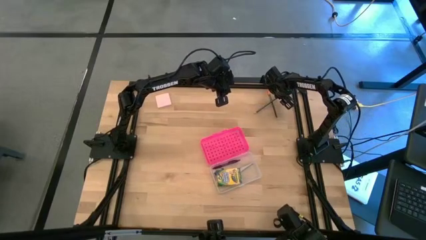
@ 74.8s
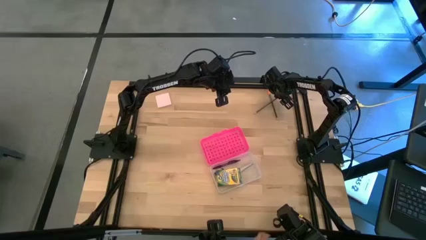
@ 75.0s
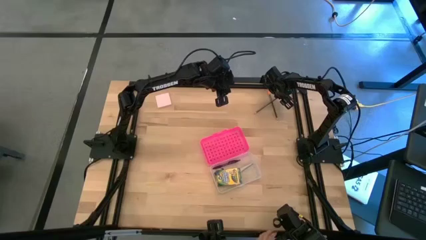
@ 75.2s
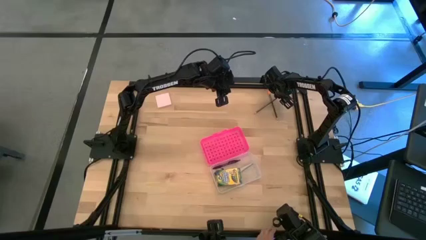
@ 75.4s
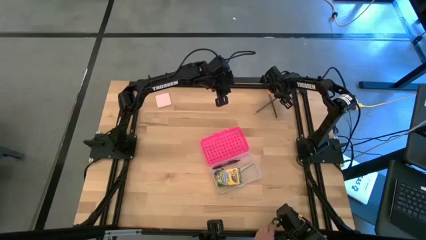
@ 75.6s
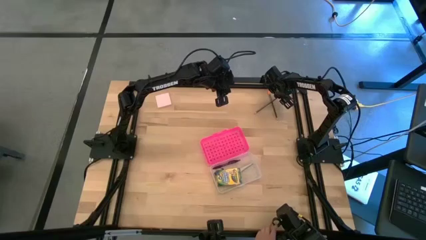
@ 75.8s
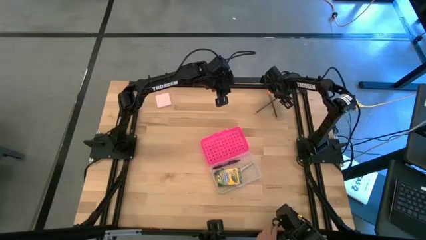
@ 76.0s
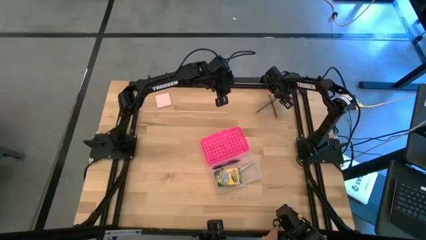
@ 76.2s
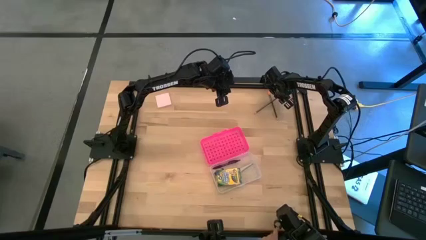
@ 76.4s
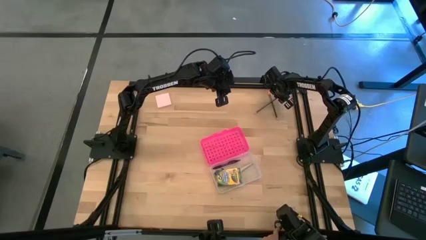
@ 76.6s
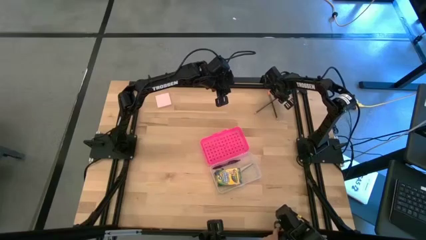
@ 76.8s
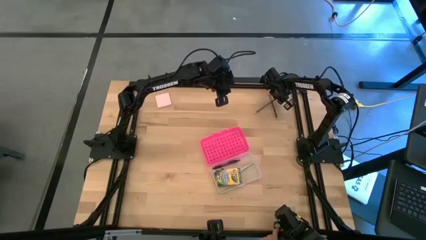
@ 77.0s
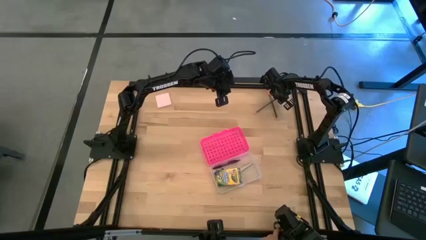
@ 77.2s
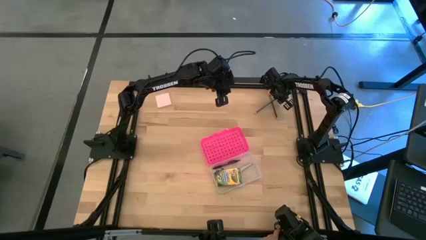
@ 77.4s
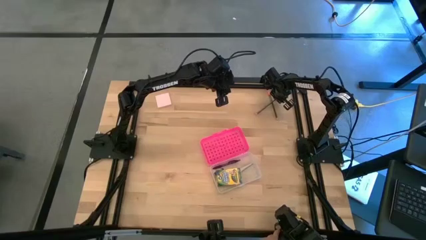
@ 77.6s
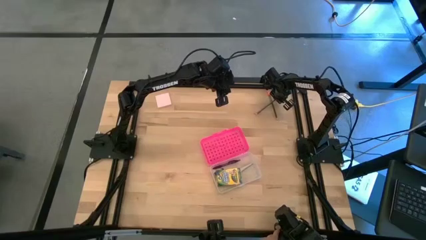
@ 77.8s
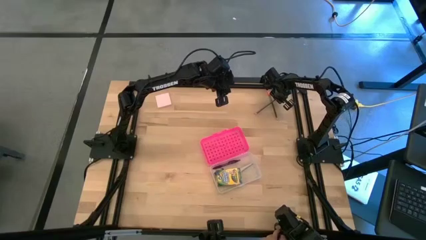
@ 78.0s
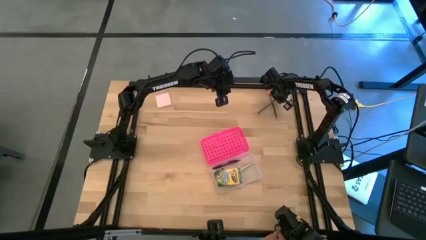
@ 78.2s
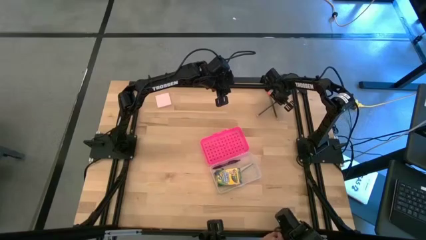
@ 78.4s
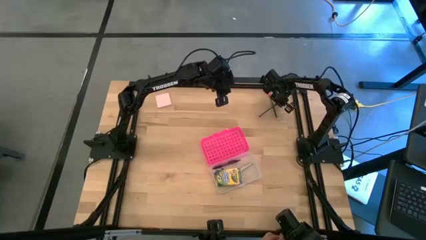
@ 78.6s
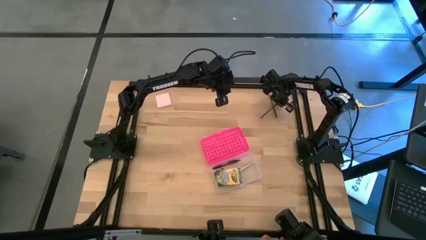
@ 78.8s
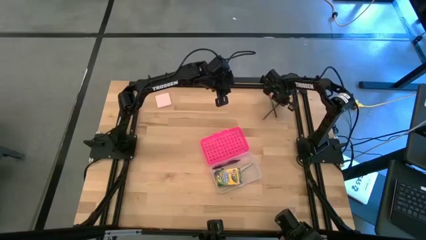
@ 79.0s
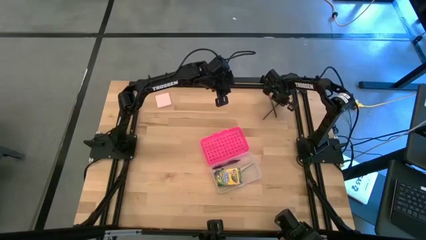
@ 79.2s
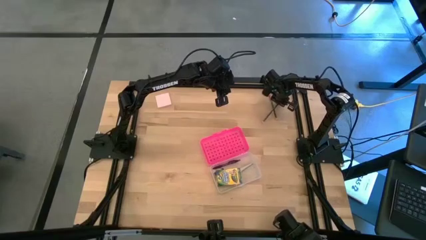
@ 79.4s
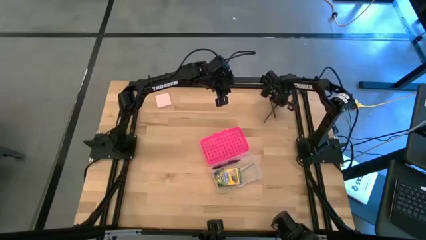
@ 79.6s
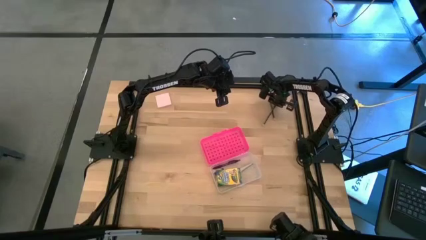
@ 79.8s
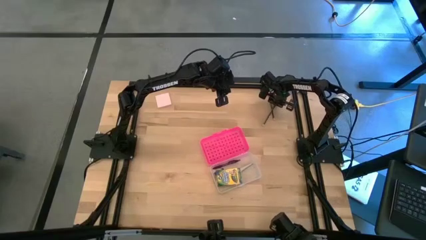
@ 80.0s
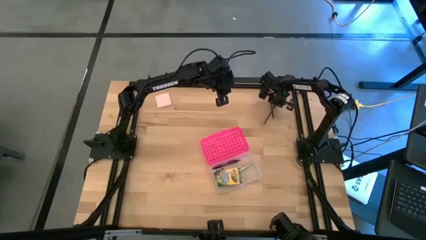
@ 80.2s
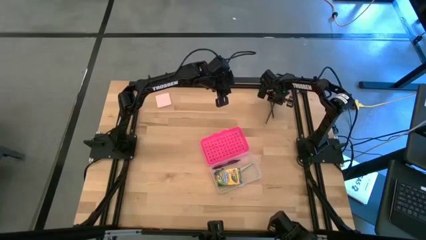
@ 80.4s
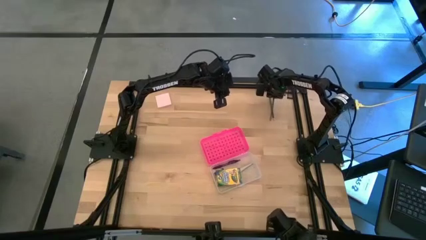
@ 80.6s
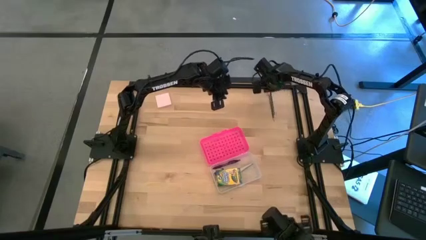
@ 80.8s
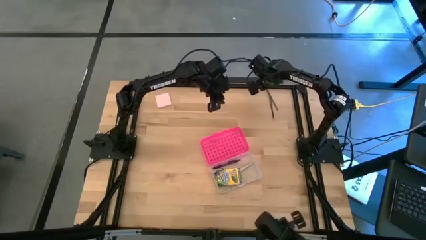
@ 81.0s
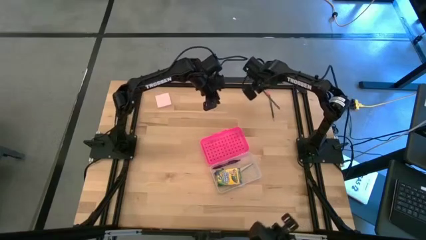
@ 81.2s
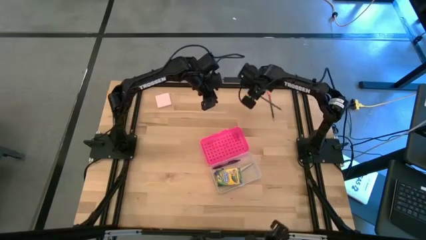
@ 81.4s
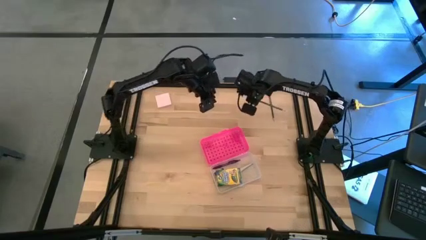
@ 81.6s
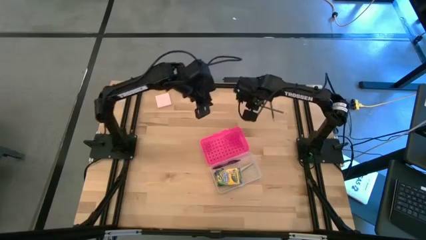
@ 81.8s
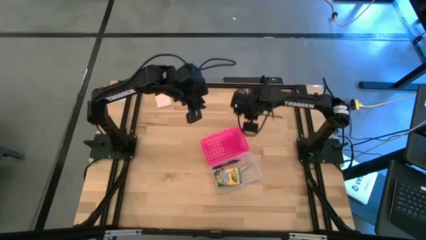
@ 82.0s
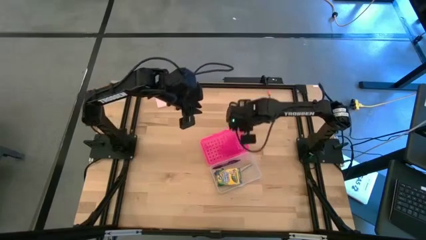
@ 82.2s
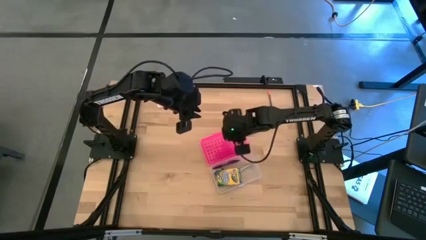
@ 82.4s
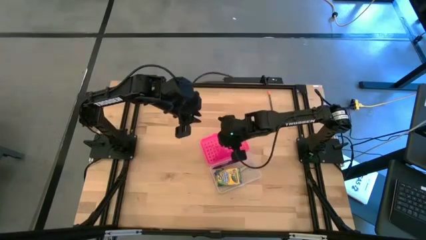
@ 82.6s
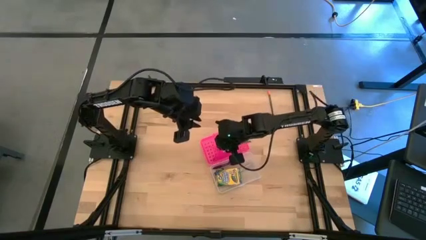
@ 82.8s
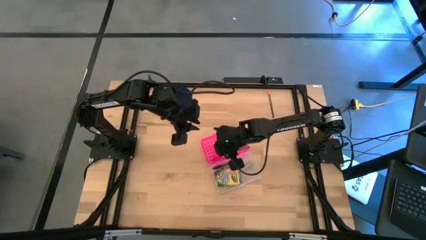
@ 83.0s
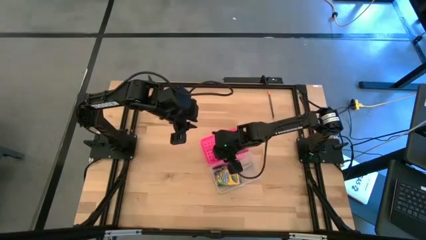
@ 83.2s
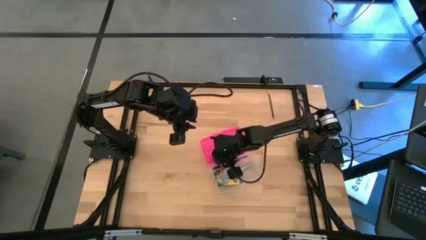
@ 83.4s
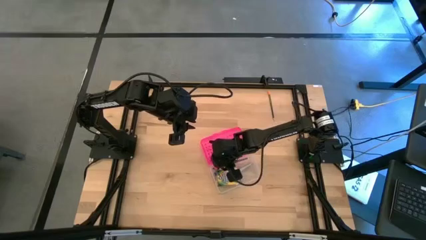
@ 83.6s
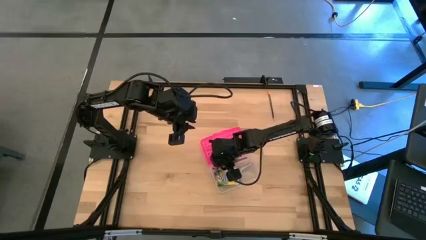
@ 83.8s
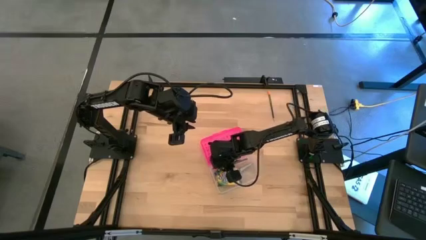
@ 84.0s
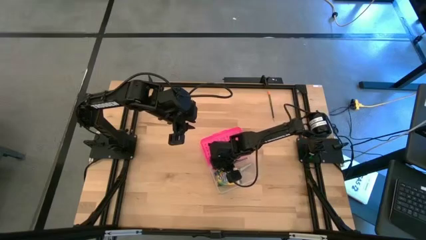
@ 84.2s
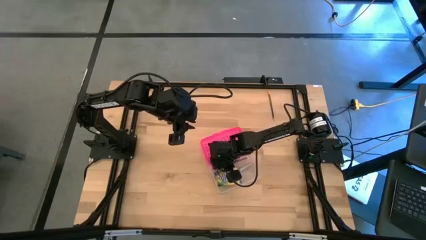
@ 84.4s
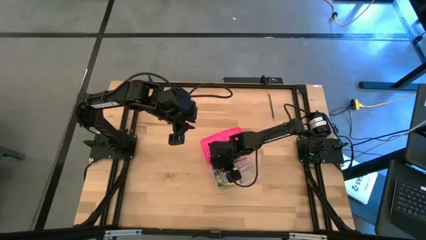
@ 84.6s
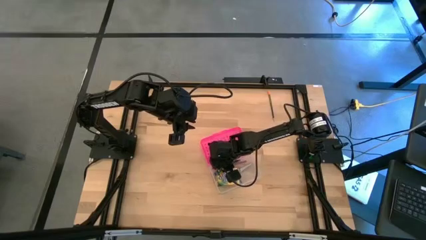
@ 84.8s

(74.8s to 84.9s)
Task: Pack school essentials
Put the pencil with the pink top eraser into the pink box

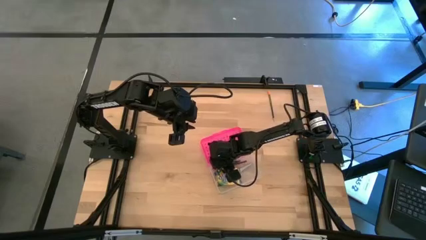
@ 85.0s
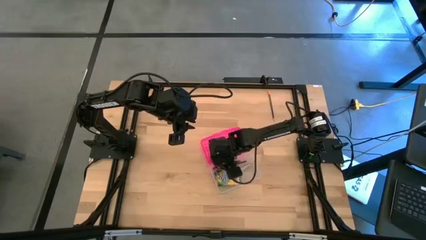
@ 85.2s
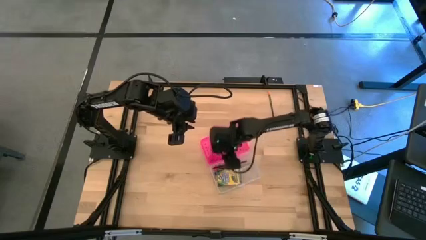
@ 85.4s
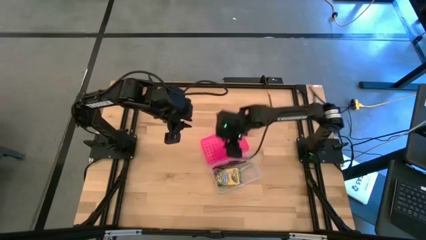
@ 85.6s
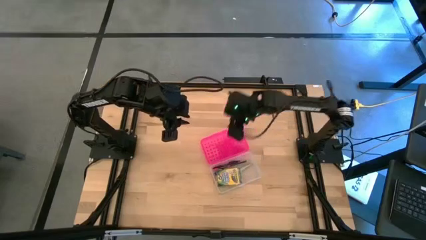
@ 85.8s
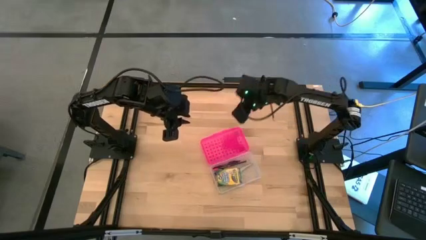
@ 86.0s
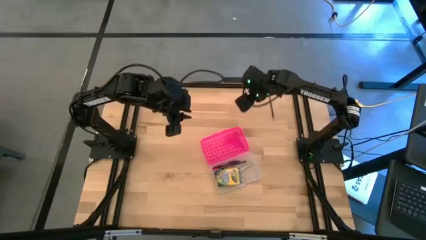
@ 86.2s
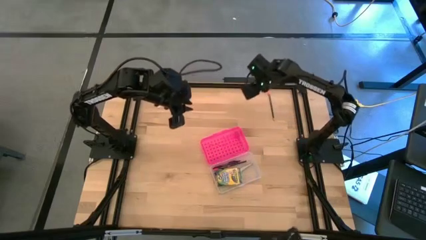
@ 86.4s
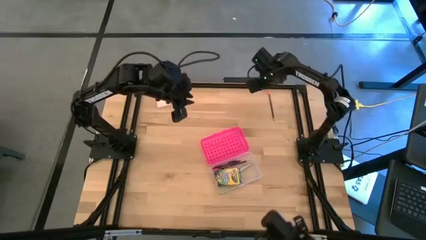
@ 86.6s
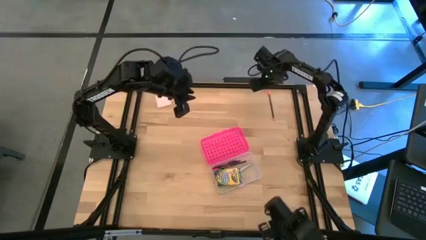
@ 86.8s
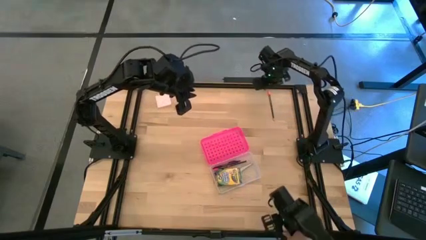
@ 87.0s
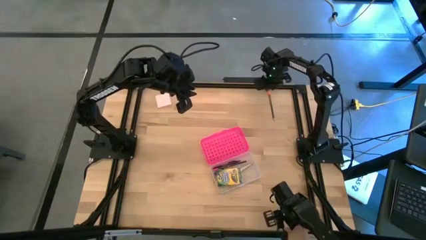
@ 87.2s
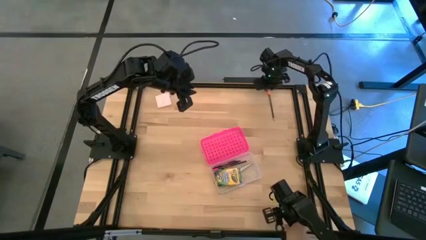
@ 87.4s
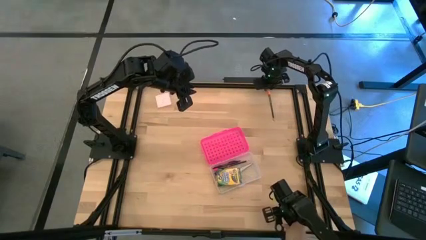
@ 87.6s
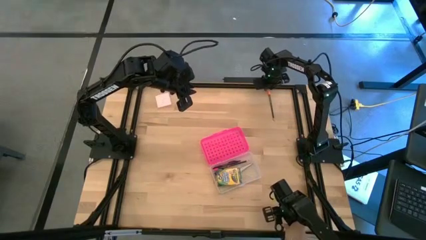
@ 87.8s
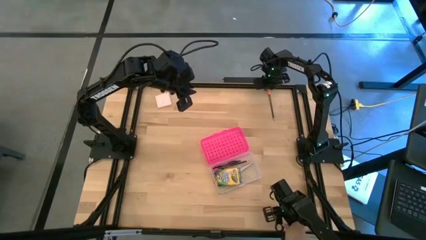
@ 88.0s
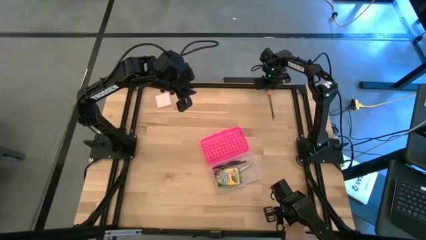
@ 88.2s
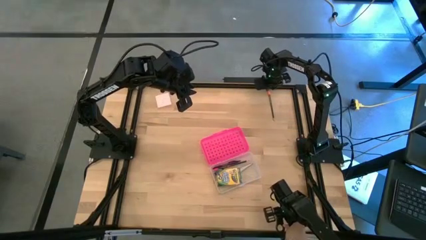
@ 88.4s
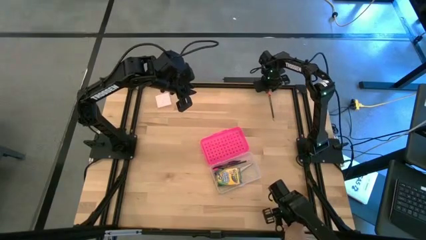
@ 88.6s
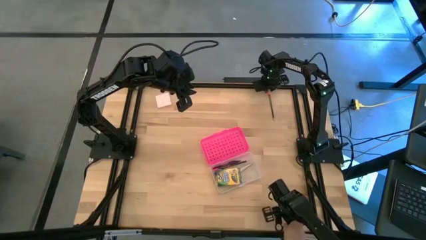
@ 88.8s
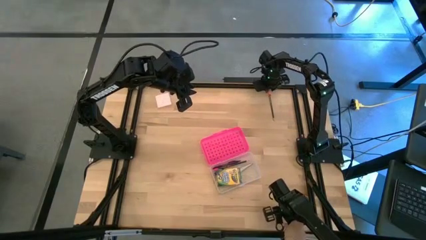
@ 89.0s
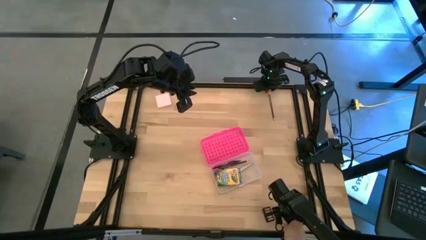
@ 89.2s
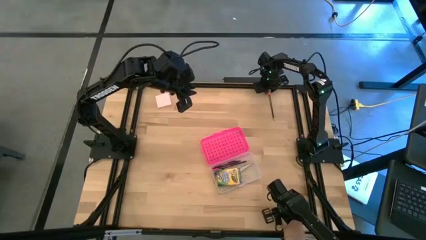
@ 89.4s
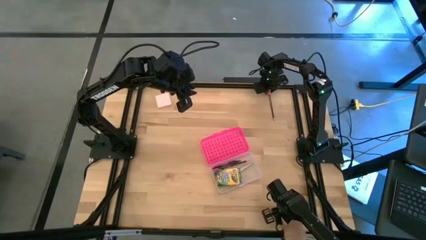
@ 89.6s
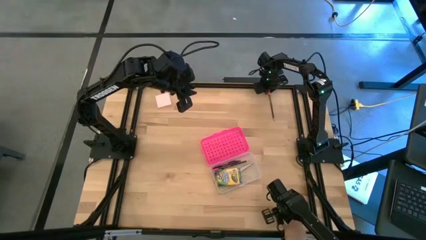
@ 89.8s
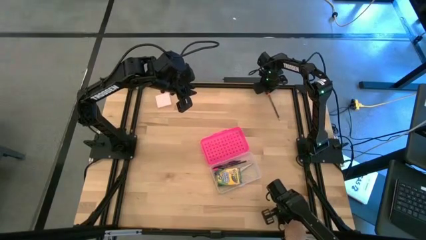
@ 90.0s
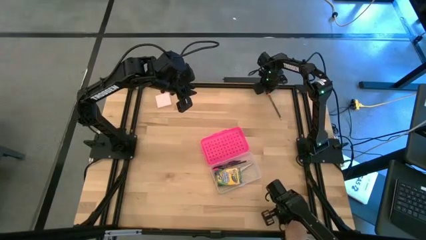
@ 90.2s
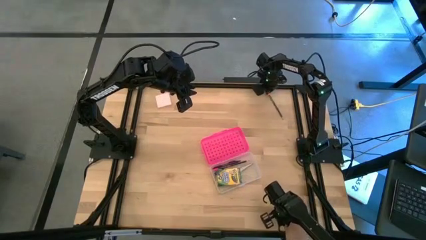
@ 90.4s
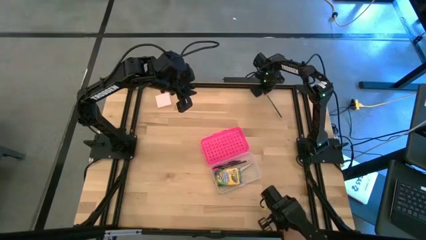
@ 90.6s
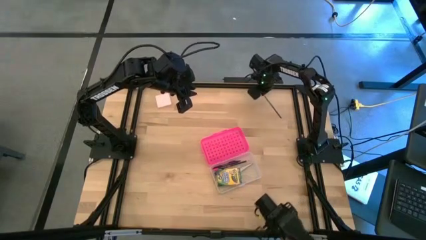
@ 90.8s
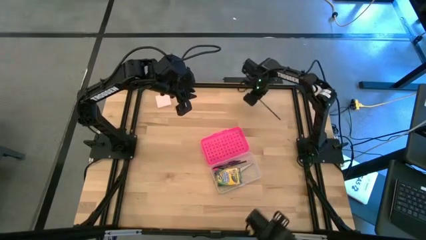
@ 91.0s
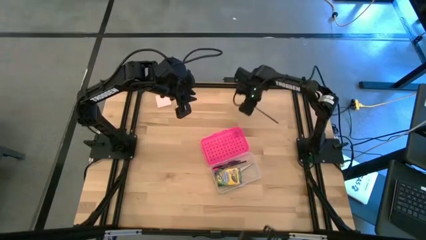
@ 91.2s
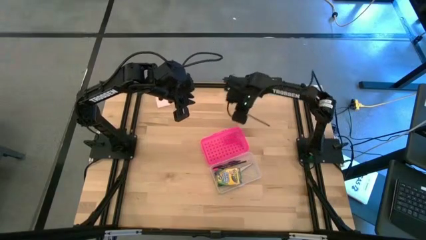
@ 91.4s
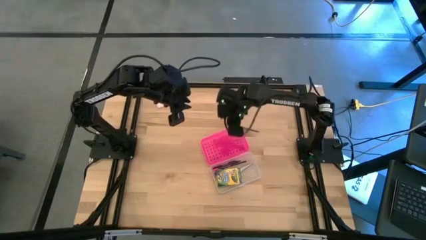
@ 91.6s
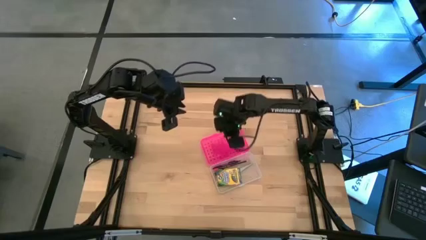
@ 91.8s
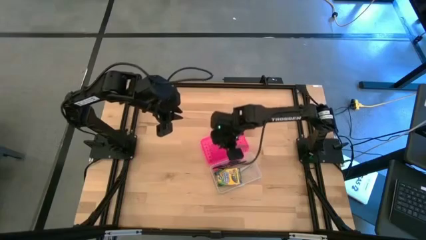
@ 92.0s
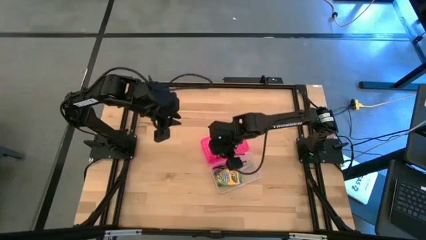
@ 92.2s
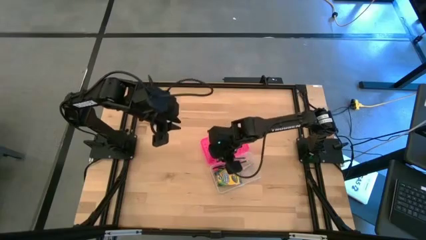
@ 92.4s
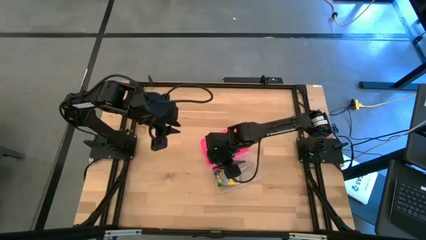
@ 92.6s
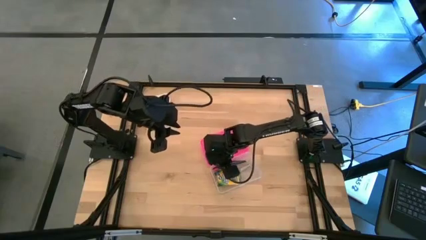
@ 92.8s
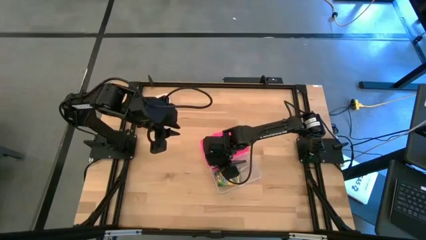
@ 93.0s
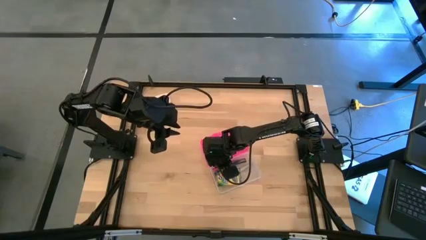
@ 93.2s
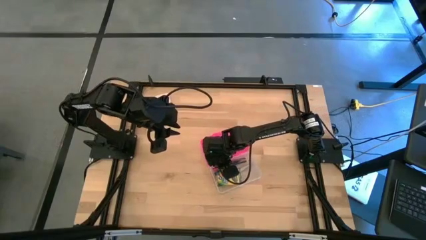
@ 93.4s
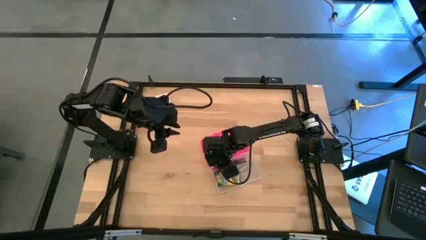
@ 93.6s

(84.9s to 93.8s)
Put the pencil with the orange top eraser into the pink box
